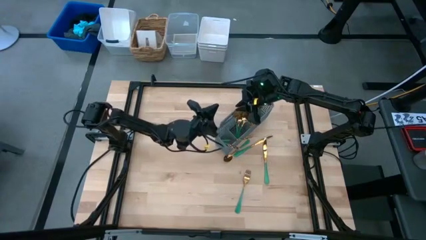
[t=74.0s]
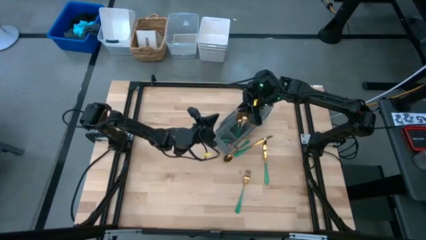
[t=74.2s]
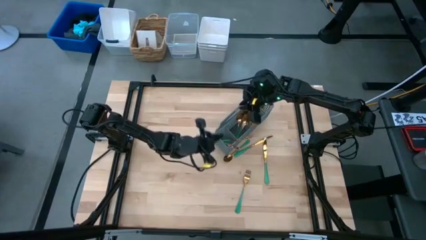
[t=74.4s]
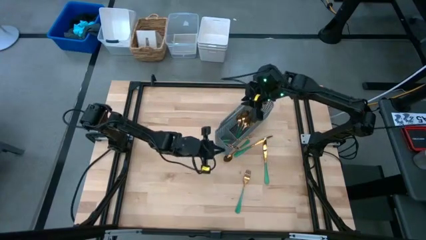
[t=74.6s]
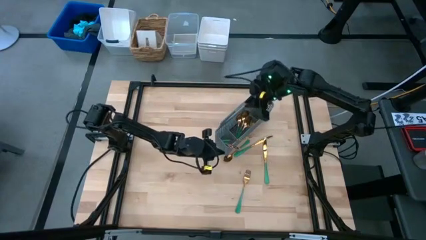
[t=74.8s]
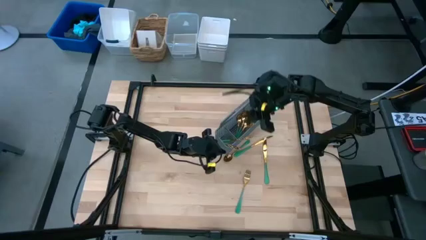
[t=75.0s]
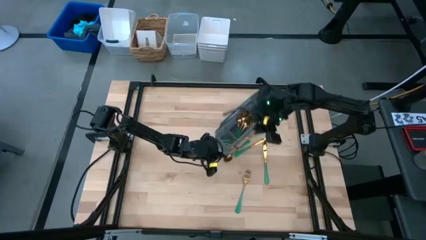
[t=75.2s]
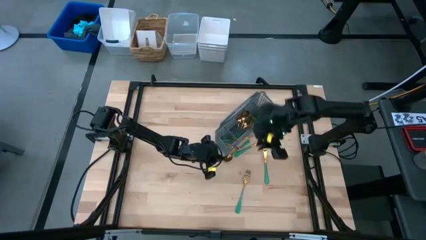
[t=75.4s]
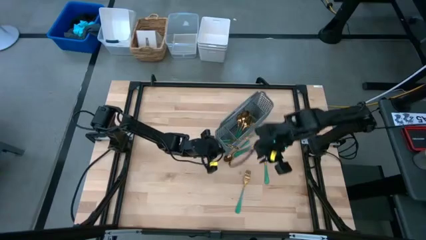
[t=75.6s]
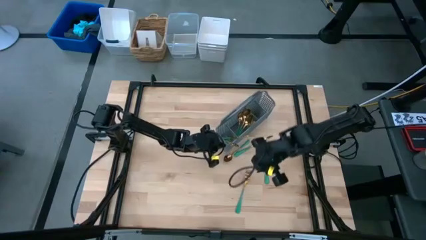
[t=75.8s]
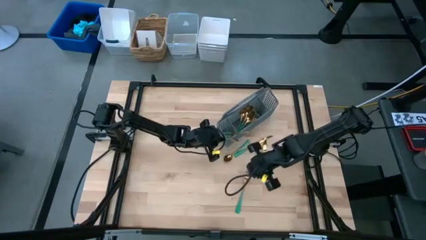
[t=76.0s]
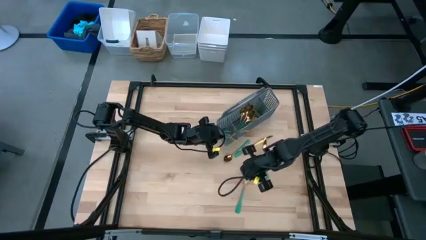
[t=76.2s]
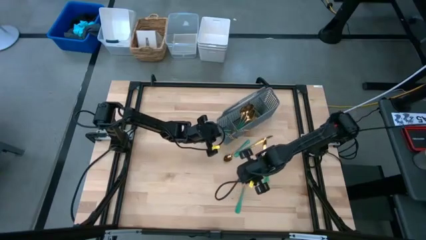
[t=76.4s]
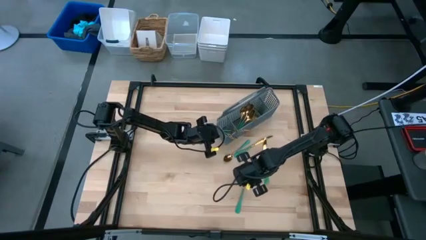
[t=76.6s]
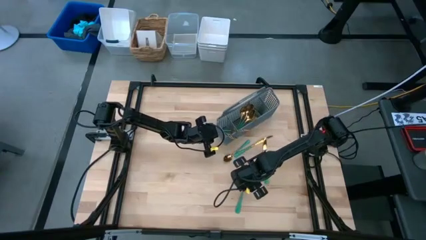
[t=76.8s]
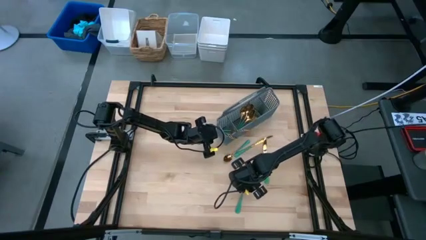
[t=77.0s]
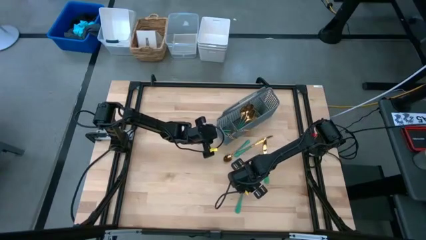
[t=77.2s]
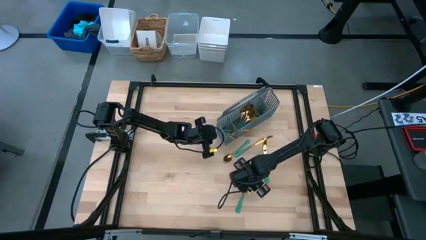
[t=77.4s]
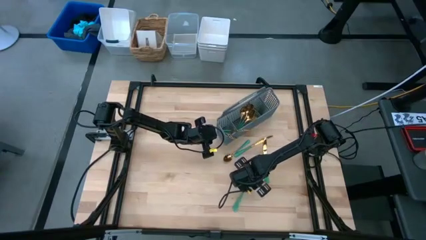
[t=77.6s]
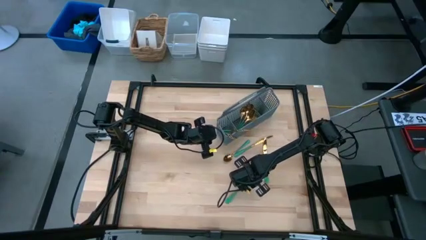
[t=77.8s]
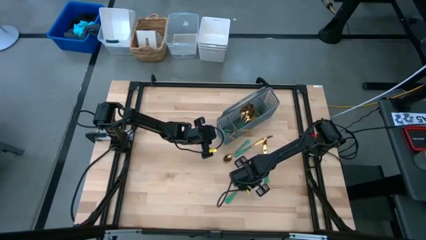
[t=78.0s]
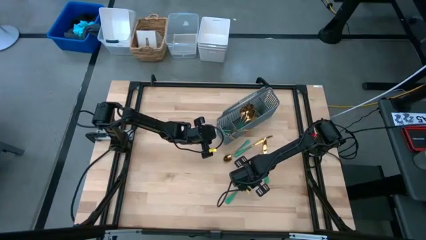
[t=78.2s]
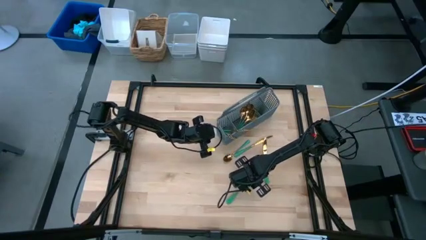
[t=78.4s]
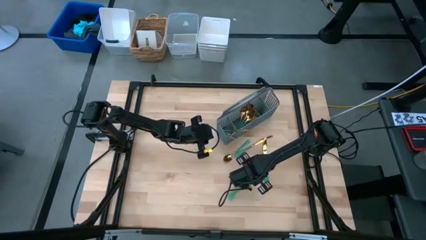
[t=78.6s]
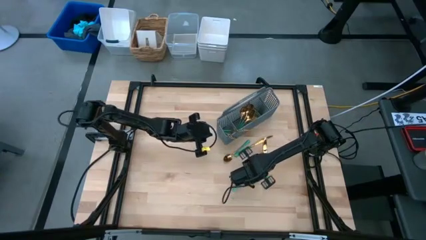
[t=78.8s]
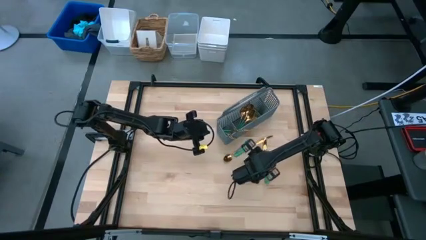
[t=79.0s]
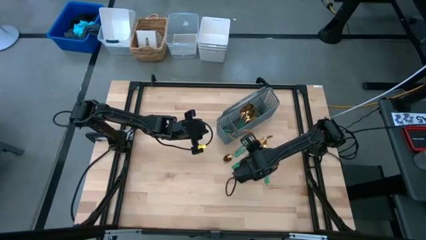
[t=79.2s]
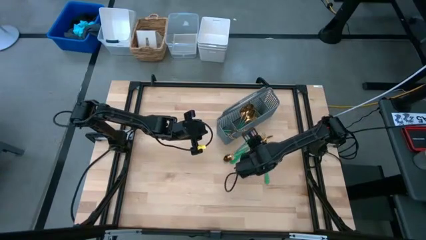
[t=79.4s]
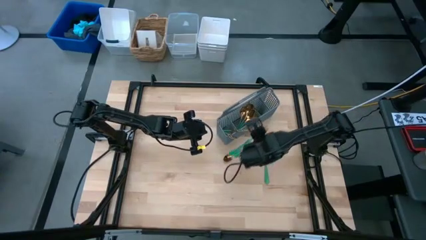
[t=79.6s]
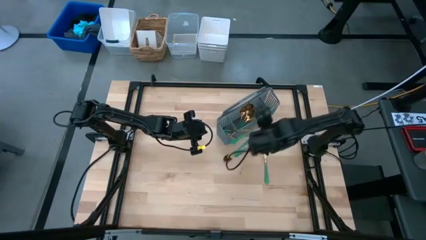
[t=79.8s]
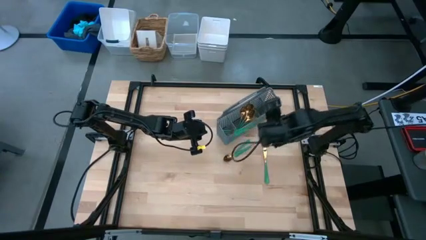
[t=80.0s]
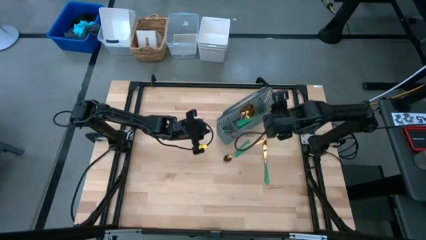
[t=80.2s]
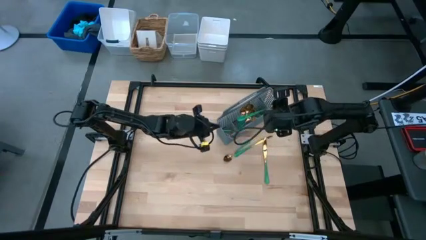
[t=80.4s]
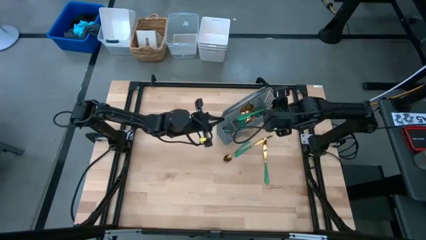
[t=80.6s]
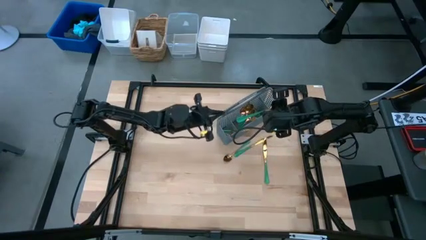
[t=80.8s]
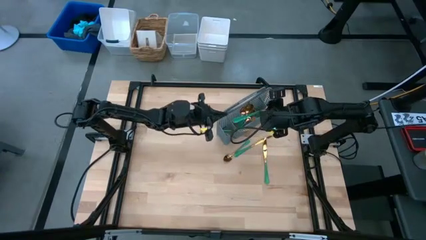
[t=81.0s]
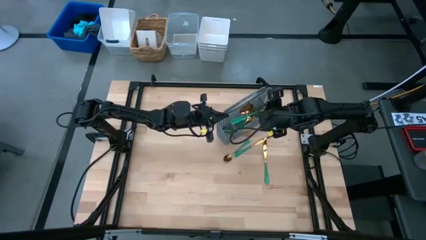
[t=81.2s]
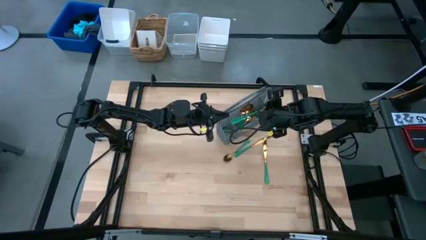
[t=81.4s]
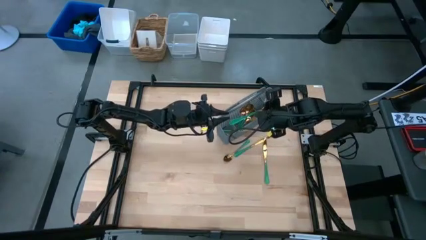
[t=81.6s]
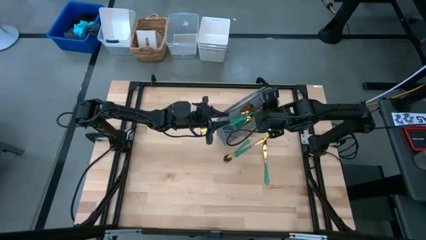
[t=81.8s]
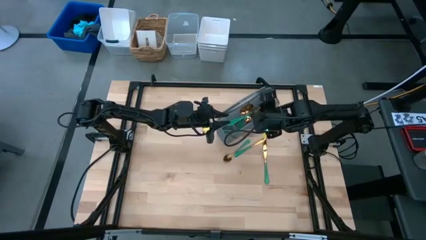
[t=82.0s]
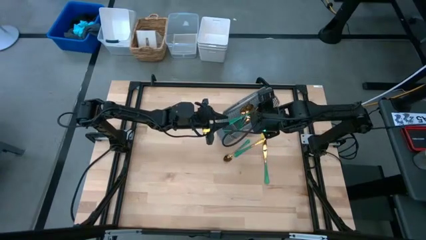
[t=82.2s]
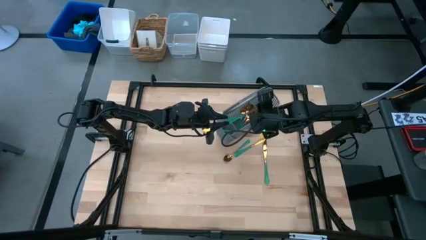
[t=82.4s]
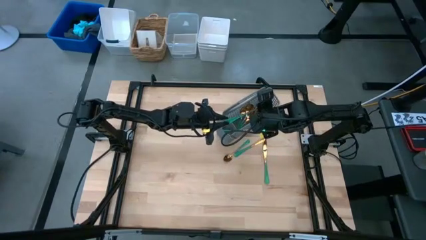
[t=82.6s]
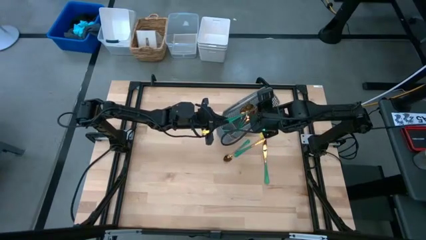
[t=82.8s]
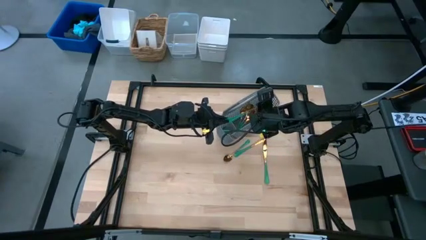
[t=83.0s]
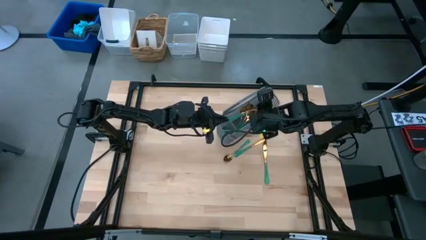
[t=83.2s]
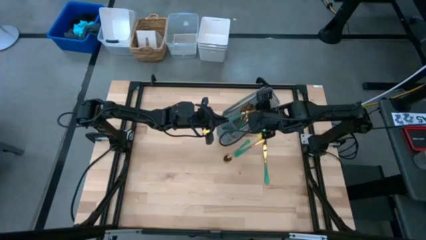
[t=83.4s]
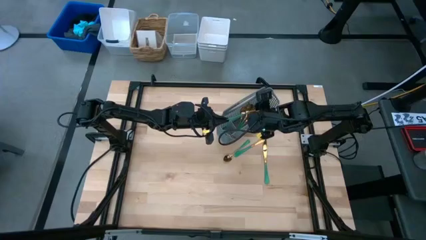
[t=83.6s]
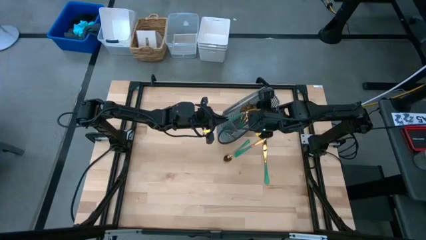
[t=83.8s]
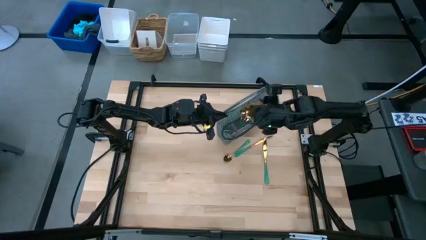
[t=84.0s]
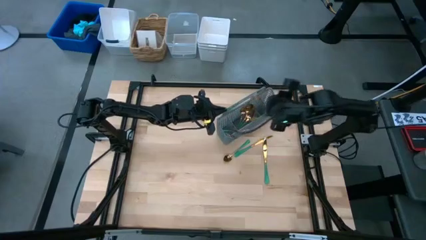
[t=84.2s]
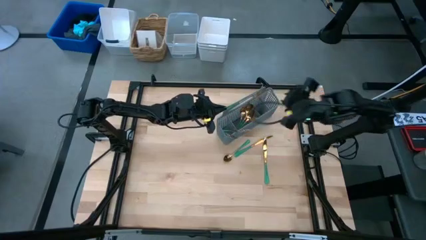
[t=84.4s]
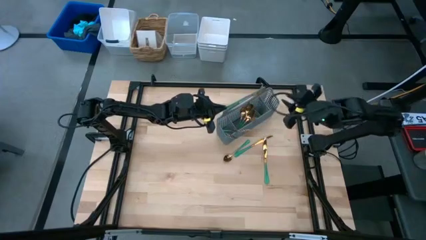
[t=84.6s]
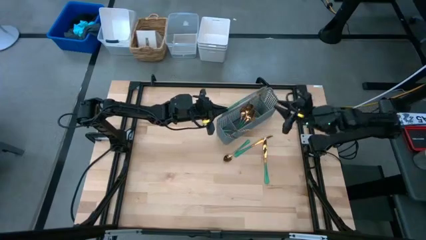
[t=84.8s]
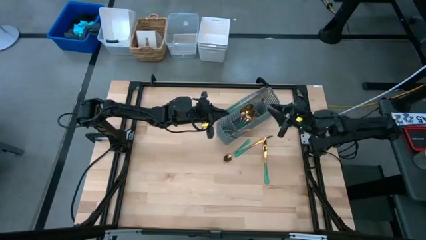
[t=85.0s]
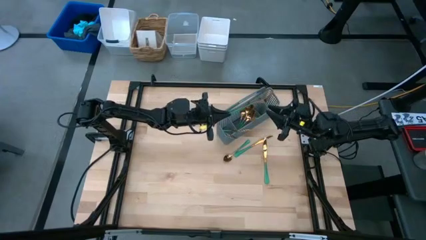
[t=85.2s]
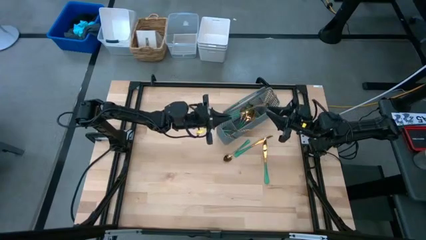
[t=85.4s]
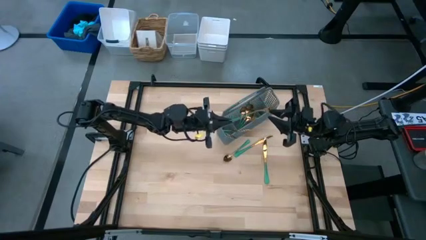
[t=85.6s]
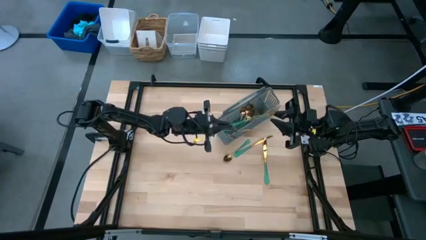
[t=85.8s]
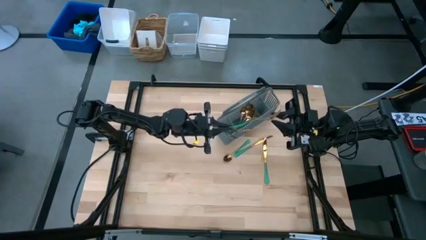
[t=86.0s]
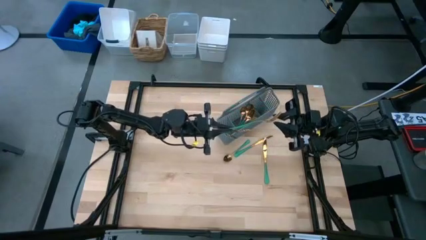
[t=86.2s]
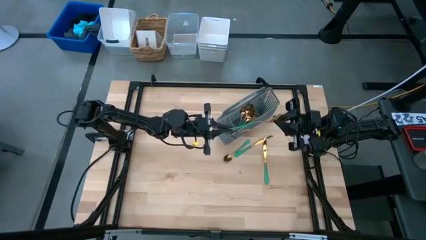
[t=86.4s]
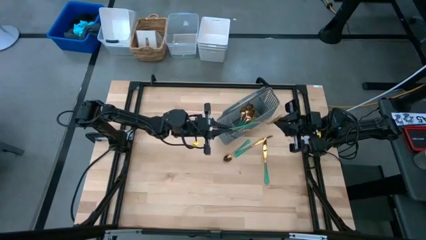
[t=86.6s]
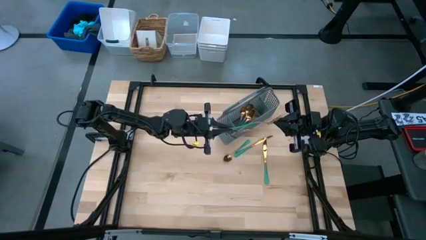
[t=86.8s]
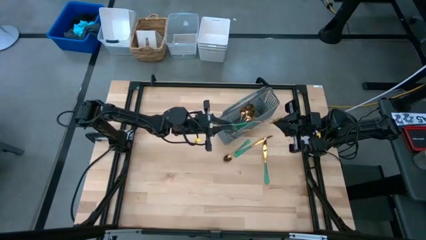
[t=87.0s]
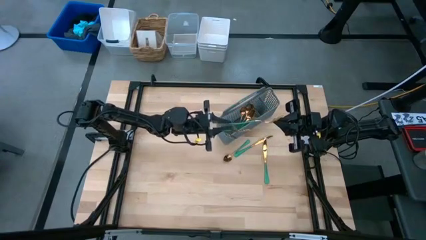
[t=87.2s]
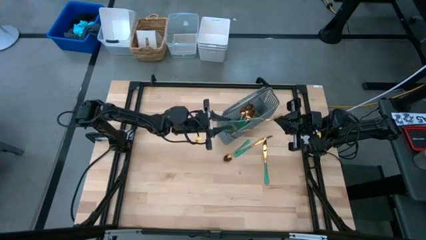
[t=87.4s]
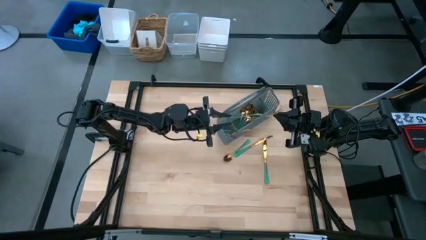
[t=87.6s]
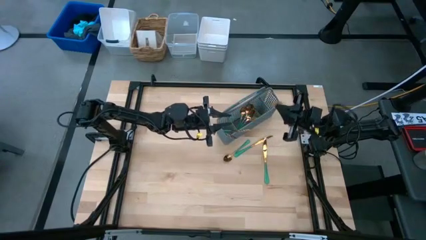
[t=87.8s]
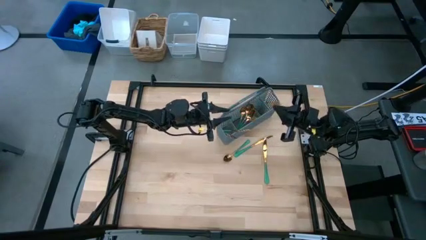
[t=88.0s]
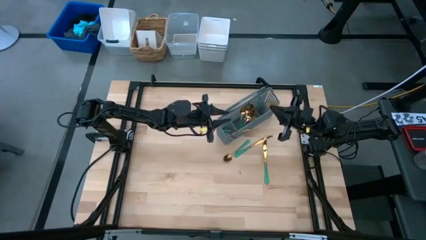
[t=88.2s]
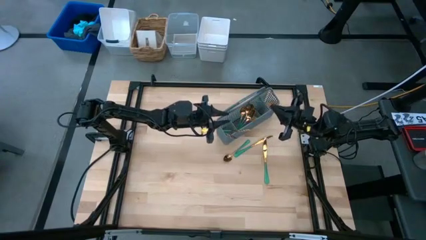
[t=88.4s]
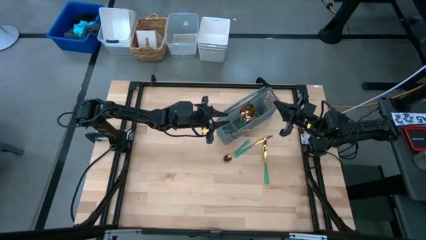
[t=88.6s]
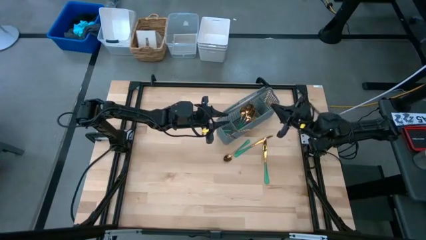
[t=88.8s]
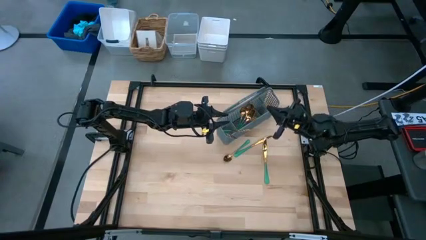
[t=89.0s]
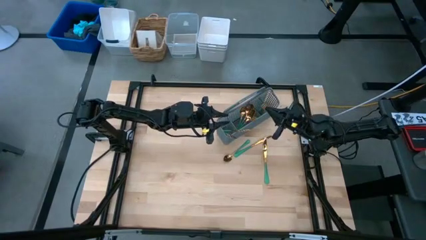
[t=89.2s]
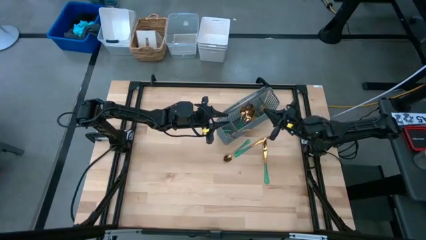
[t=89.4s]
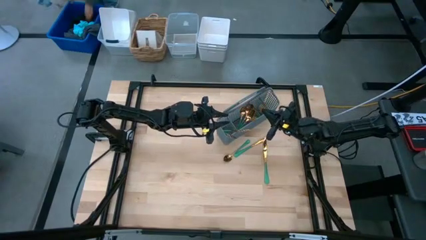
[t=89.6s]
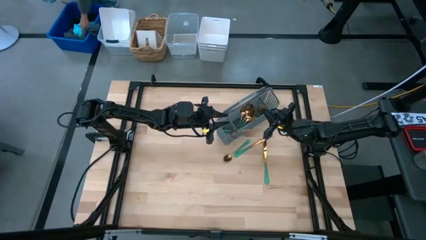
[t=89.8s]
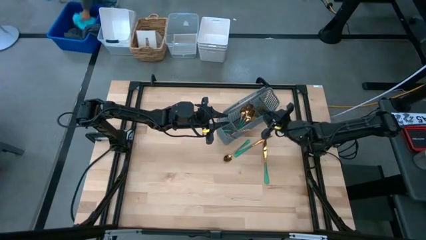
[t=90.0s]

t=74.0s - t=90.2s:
Task: Sort silverware
Put the lower fork into the basket
